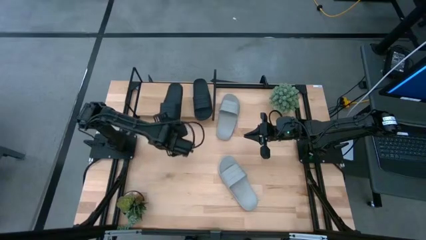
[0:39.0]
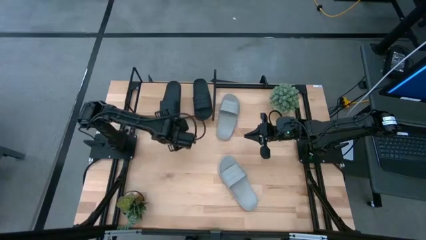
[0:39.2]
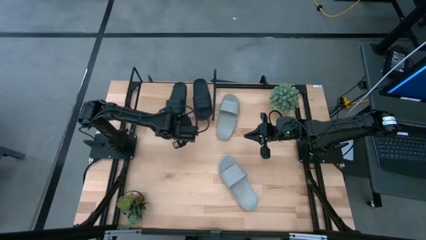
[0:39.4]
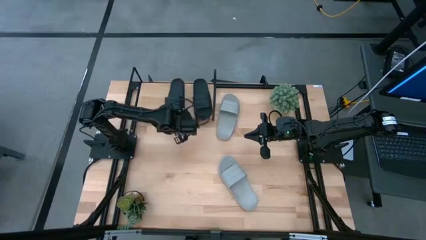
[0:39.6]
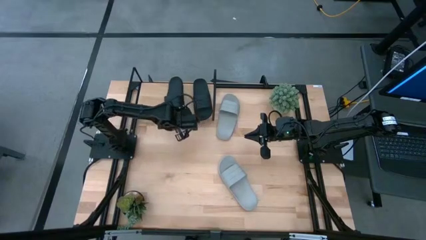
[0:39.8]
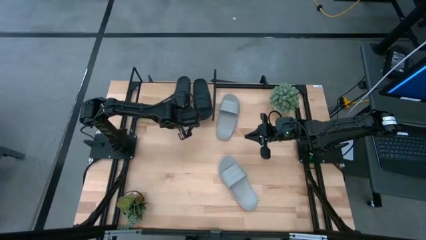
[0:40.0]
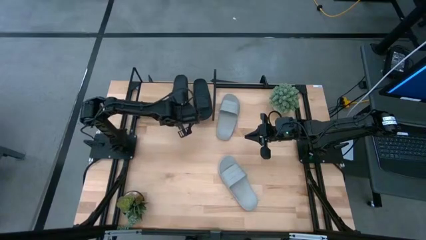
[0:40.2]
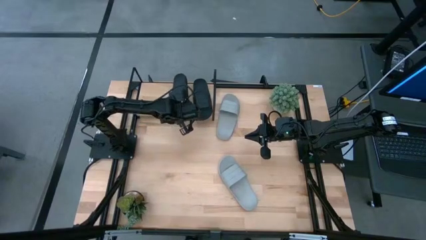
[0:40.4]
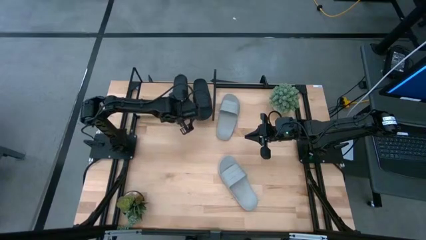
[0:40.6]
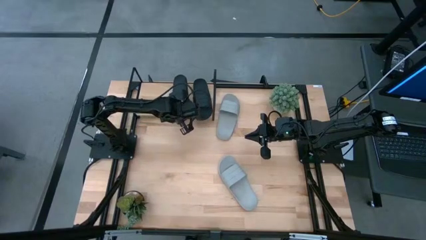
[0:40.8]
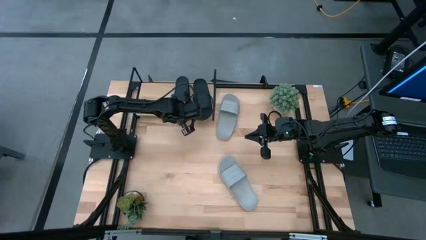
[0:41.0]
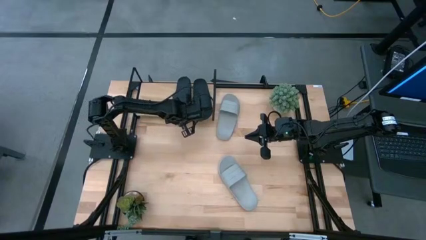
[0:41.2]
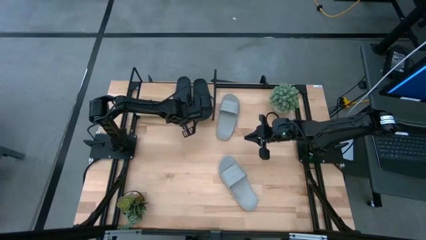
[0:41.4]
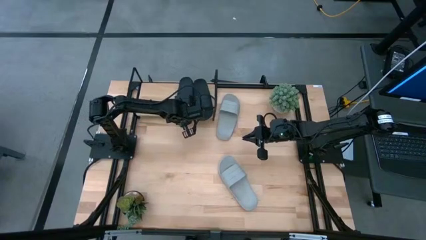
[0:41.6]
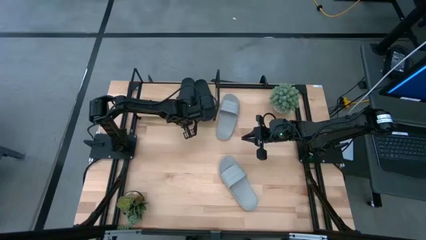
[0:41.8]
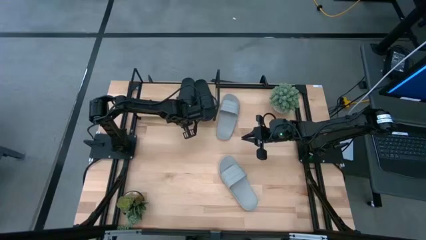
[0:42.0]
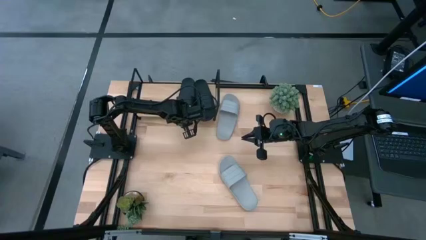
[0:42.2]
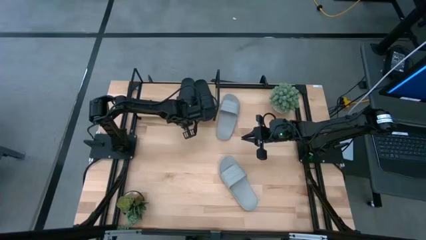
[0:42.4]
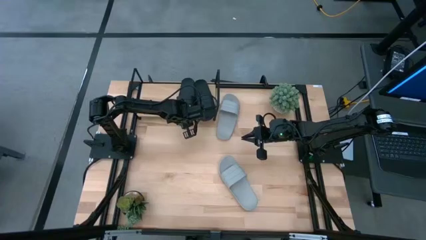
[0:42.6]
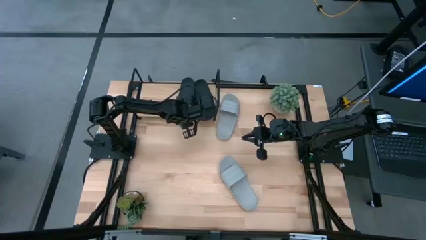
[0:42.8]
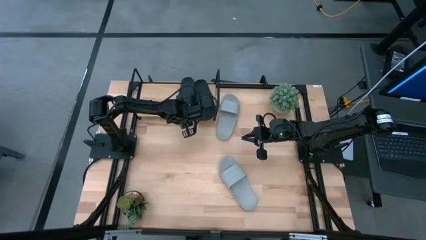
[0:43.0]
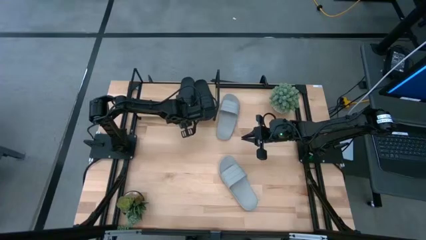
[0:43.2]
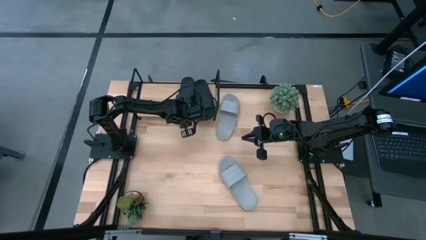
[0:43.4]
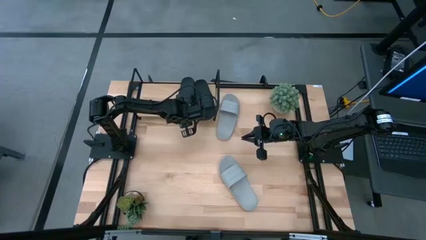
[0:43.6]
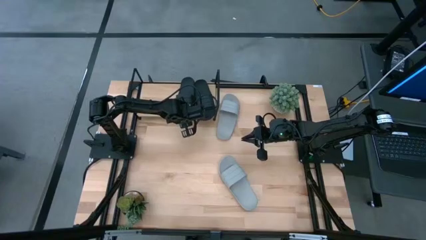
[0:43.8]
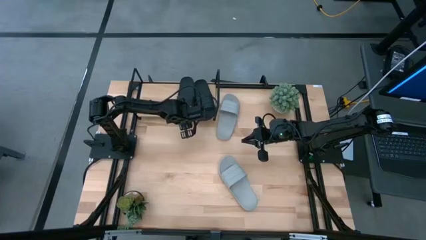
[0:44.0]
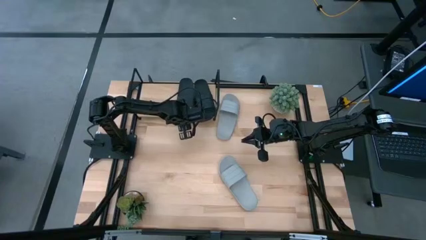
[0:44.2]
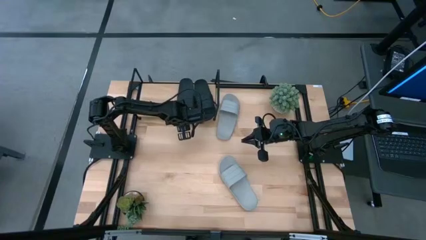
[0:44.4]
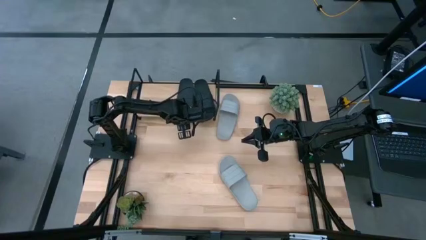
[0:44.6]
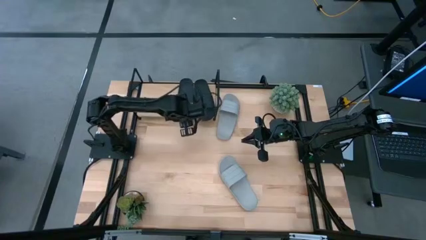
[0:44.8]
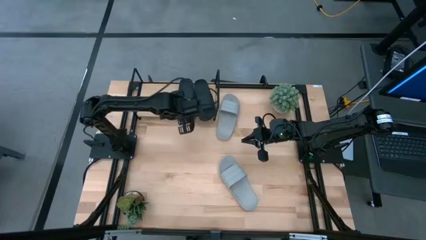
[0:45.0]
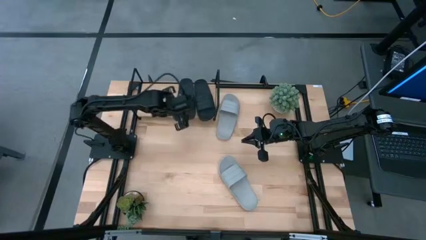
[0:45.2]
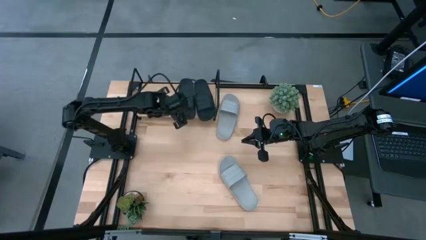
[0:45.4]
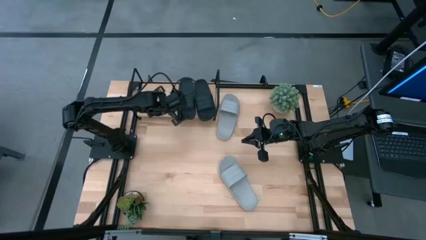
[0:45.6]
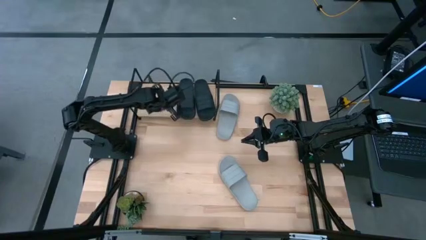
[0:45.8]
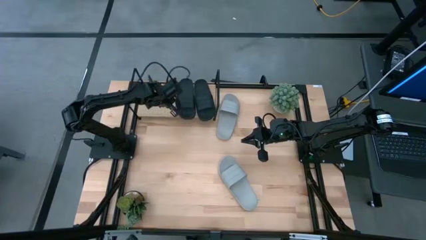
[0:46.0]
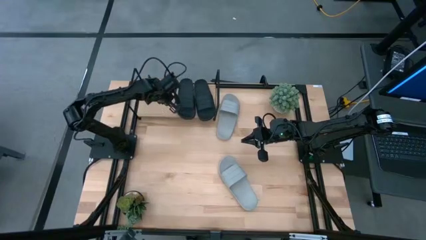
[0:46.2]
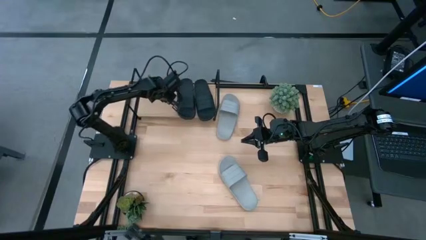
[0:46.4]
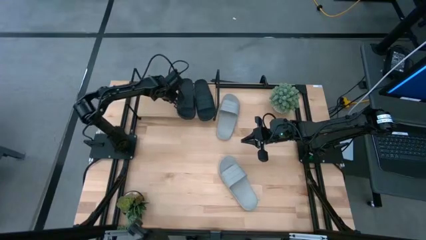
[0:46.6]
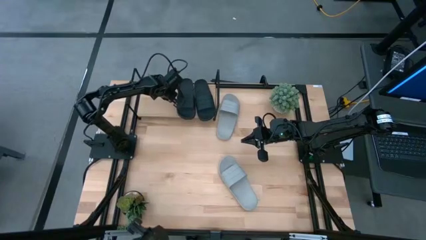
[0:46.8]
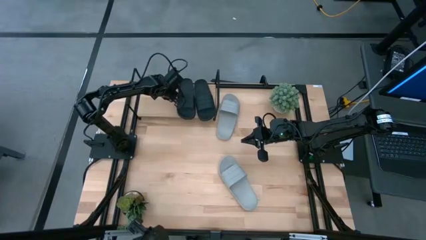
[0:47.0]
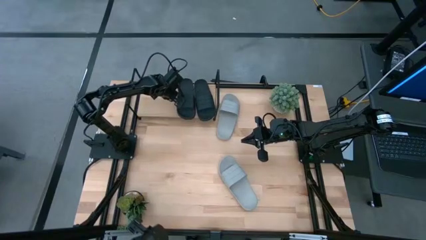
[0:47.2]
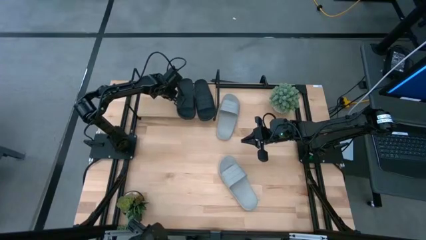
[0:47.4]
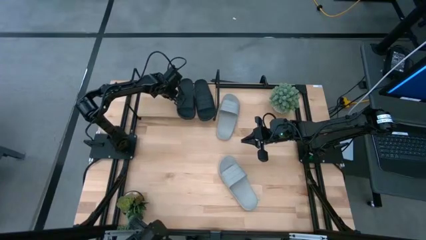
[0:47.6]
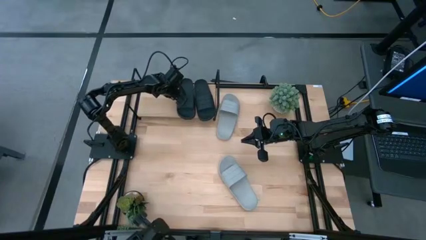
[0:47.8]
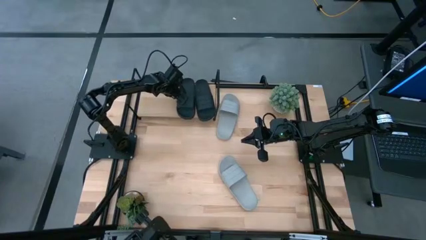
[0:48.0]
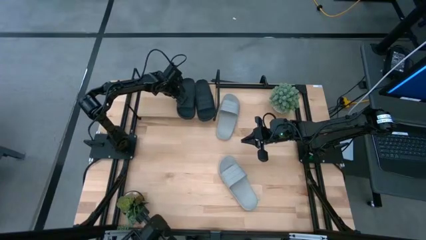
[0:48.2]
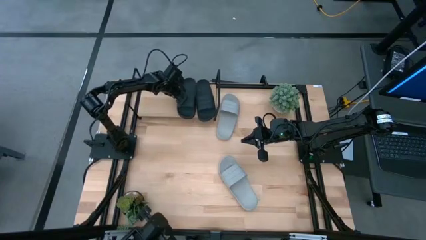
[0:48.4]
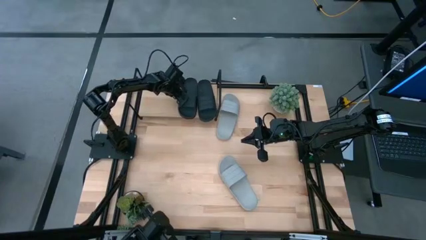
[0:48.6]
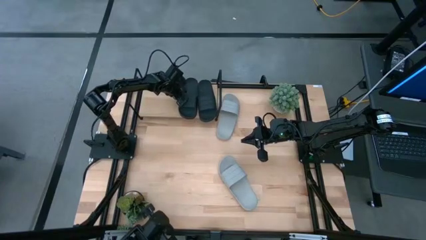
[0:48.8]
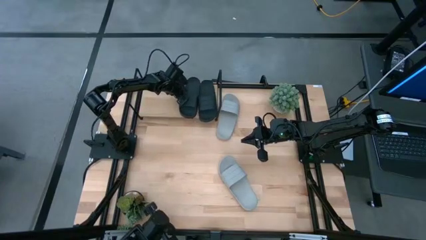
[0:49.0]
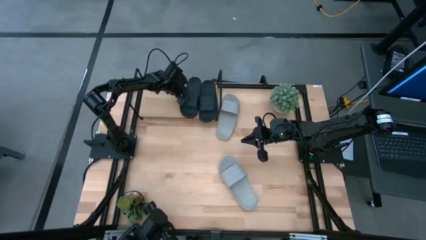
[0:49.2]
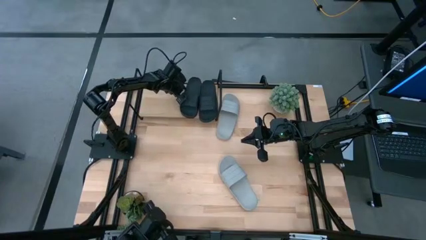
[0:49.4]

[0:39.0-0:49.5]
Task: Pick and place slides into the shelf
Put the black slides on the shelf

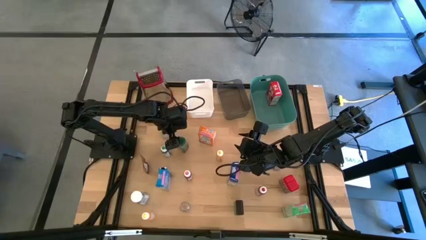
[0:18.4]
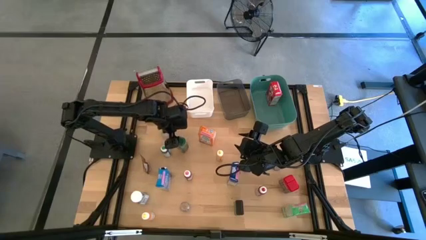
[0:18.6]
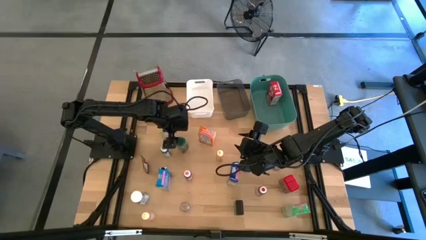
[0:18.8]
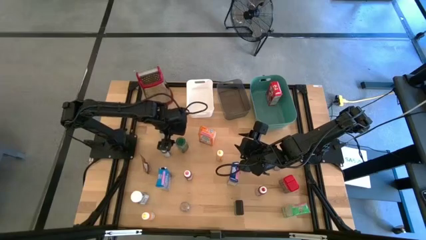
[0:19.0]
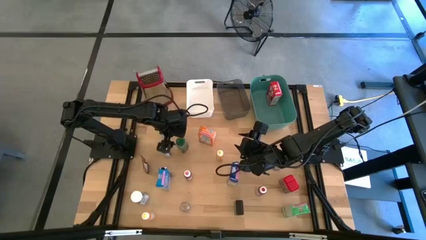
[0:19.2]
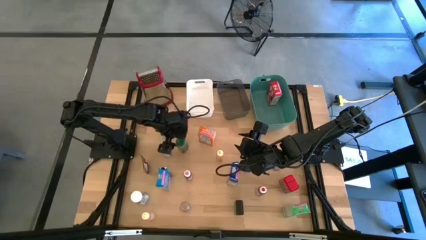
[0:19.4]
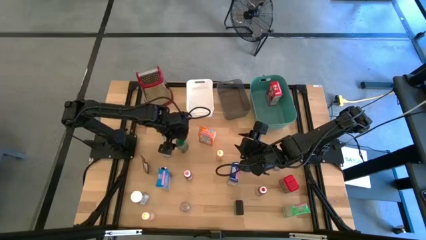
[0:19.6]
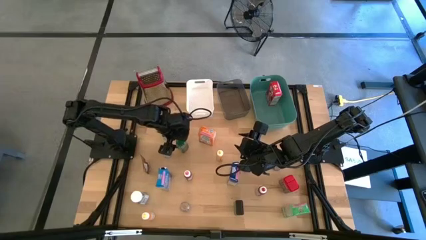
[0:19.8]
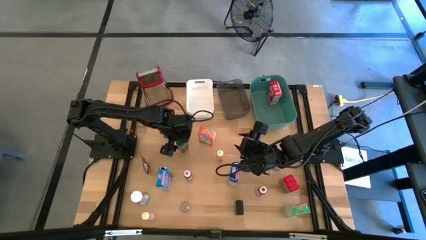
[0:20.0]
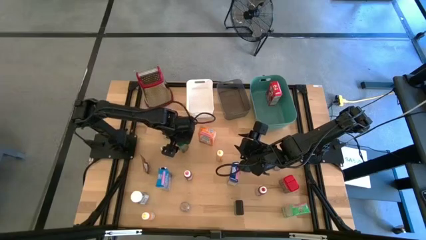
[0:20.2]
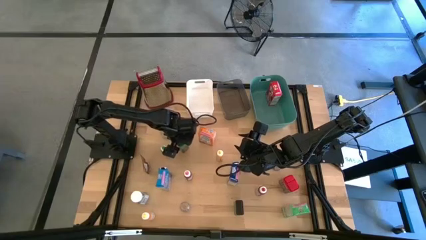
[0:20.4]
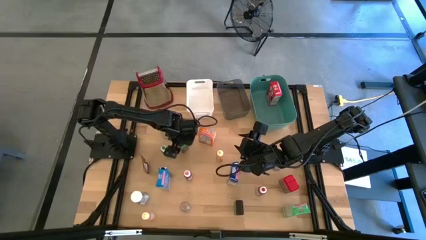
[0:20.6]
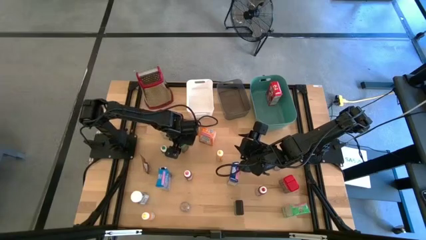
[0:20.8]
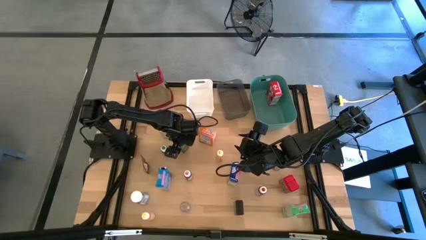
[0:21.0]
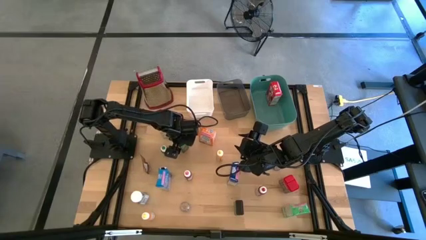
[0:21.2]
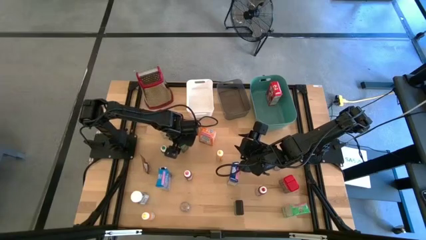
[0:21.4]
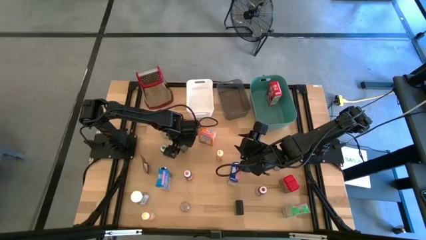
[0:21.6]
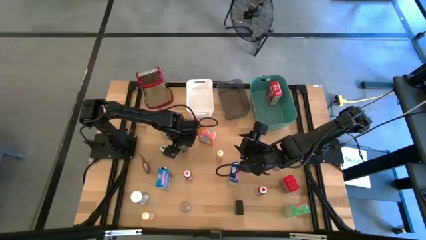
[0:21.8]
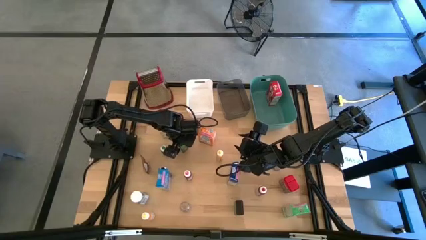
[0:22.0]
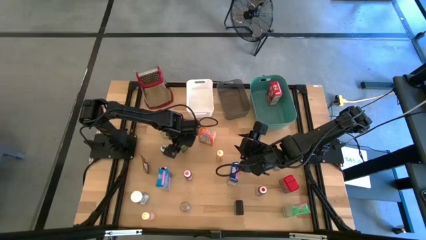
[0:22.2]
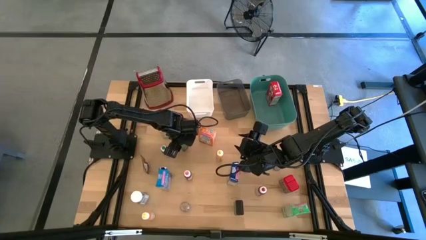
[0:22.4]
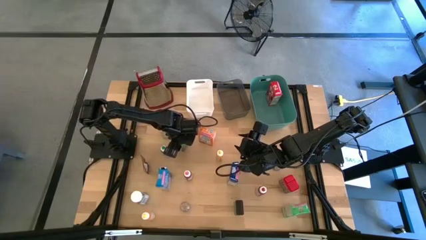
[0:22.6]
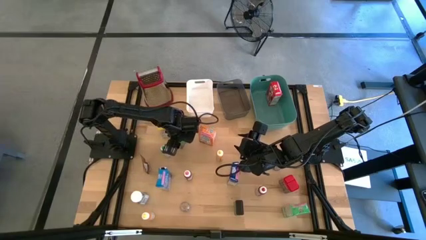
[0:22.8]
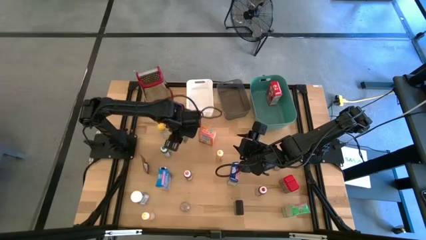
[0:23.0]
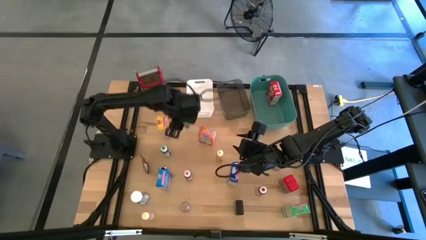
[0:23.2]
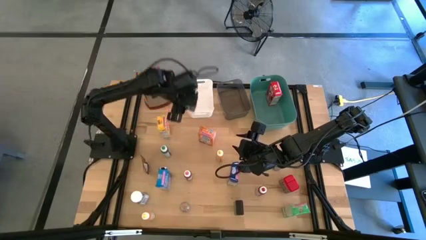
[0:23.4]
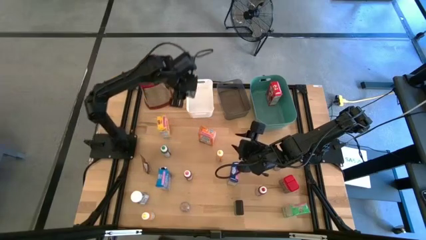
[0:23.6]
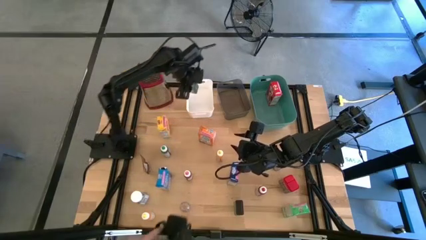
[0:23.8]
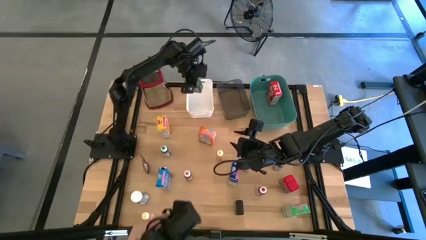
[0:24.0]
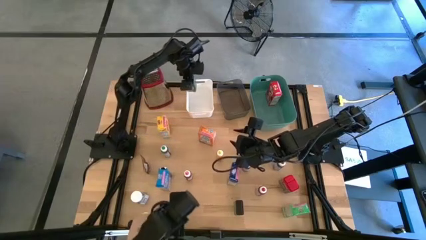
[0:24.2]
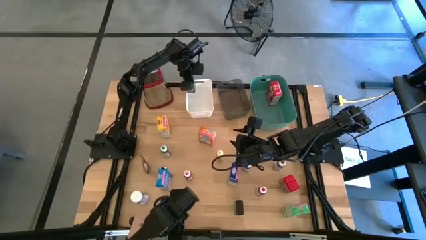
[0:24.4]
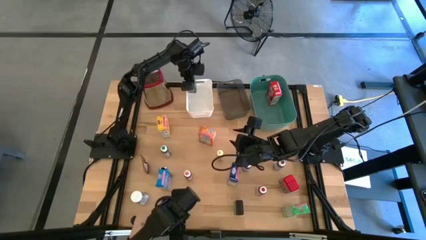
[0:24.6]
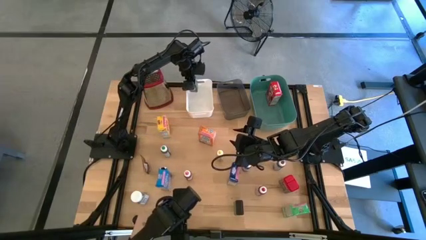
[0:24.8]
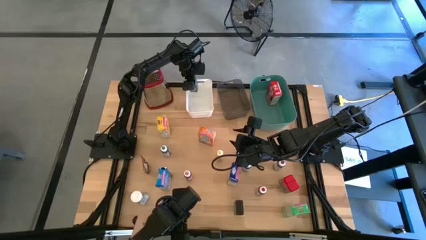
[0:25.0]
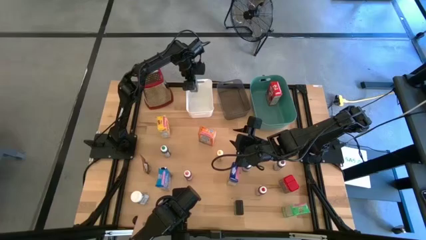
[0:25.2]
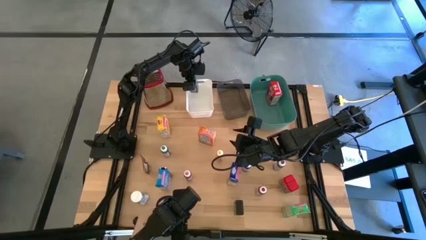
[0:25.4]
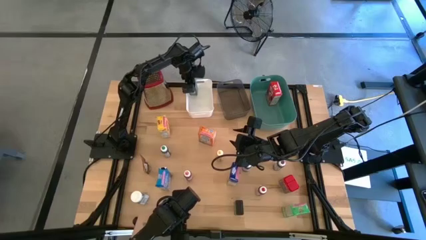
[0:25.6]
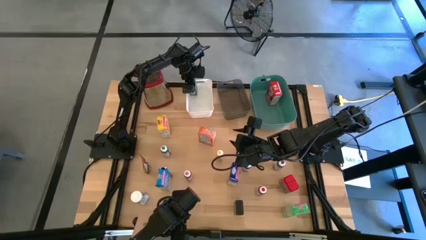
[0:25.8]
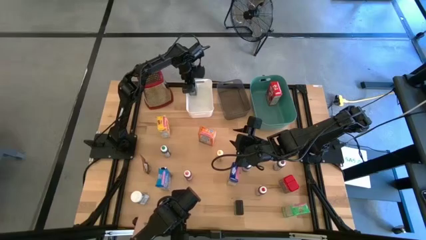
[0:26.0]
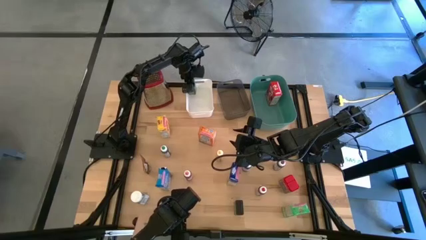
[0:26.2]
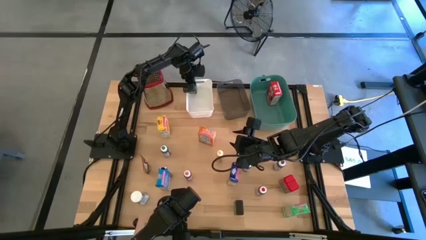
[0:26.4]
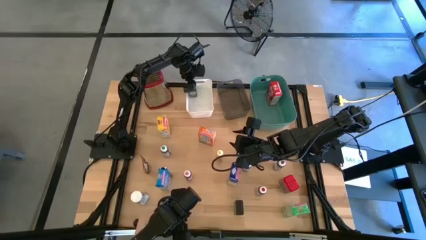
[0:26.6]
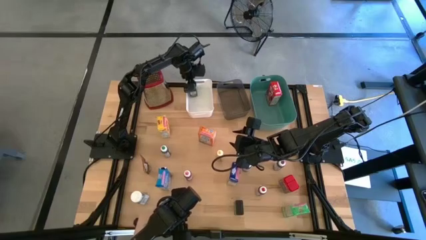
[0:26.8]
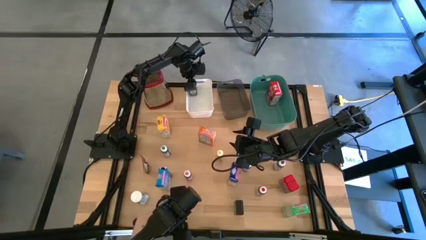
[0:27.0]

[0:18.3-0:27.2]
Task: Pick & Place Kitchen Items
Put the green seasoning bottle into the white bin
